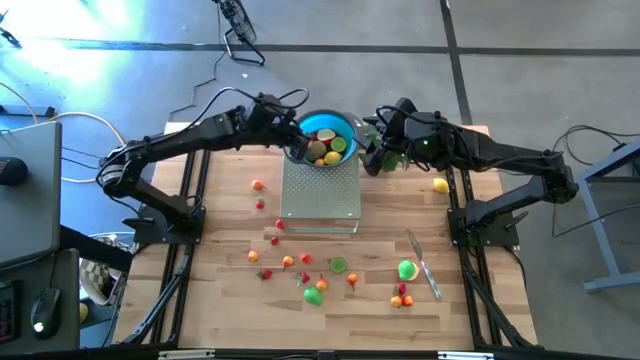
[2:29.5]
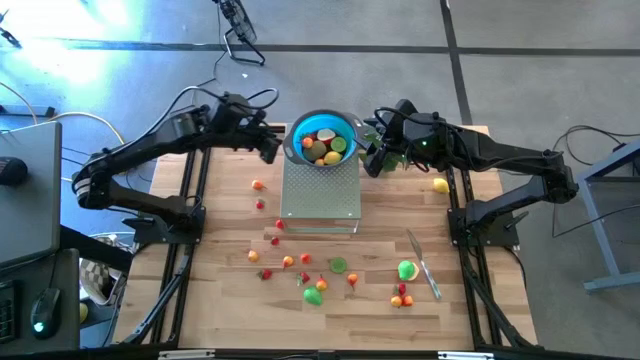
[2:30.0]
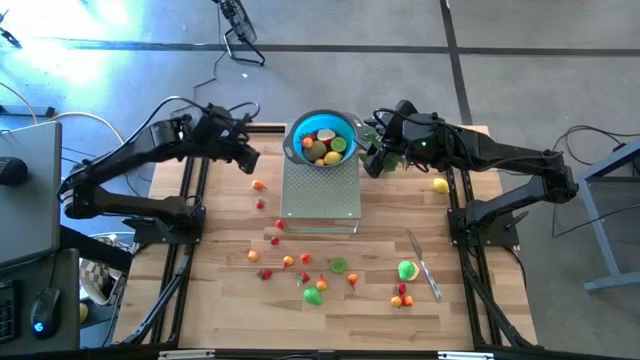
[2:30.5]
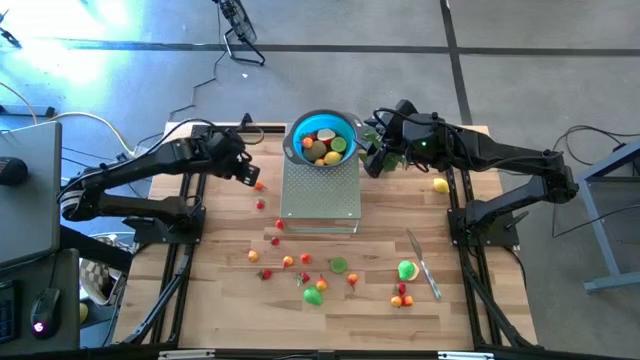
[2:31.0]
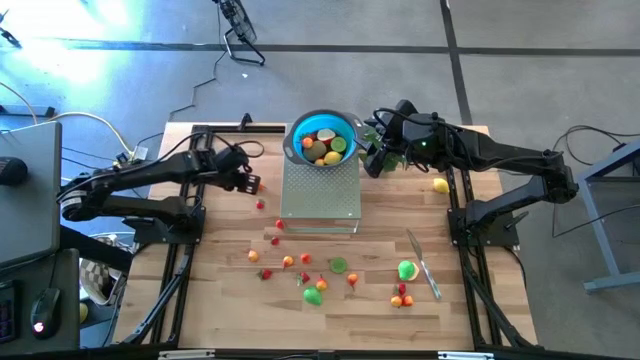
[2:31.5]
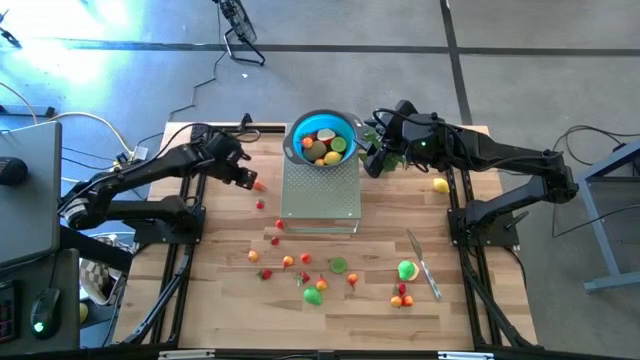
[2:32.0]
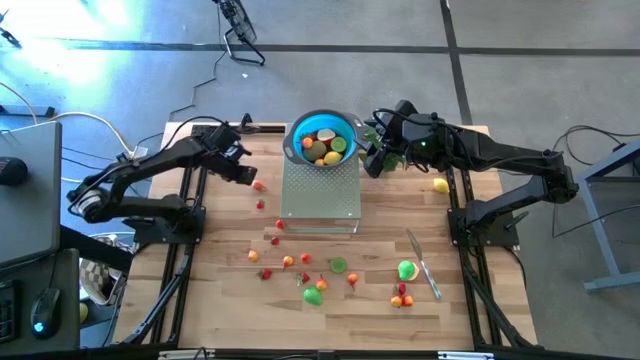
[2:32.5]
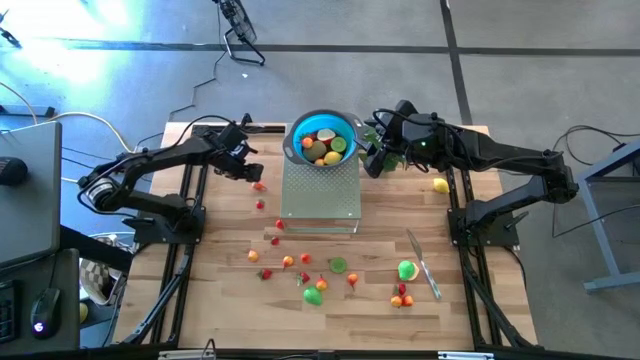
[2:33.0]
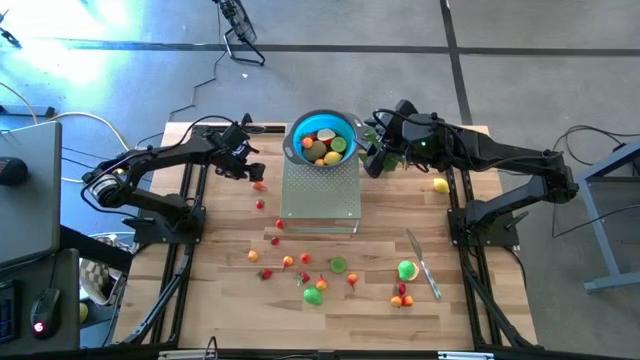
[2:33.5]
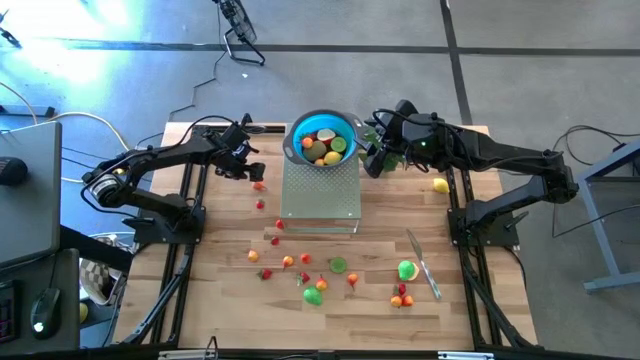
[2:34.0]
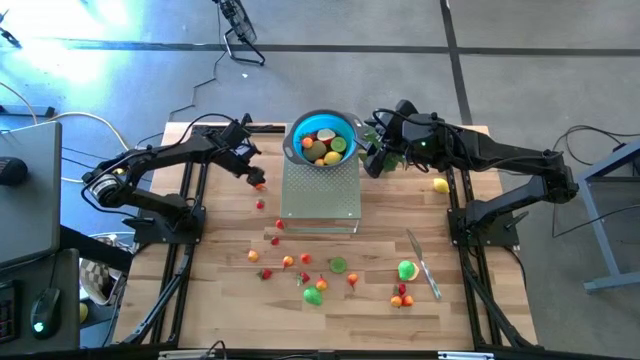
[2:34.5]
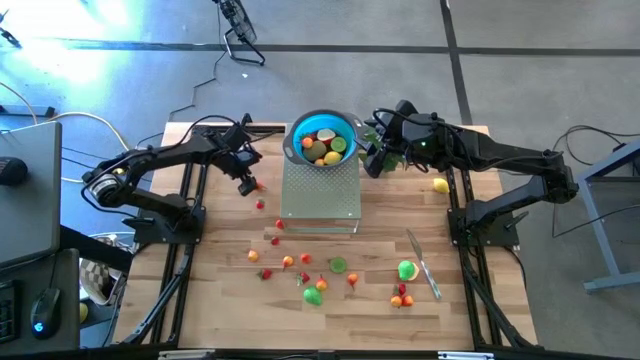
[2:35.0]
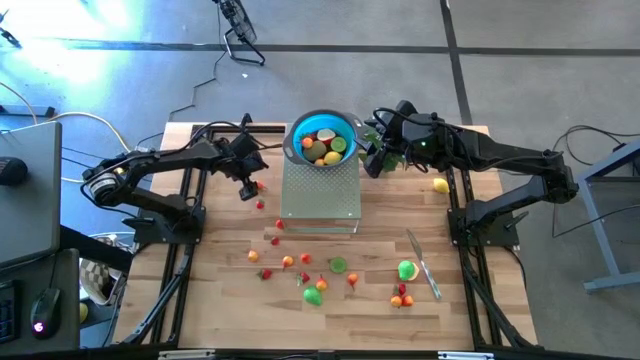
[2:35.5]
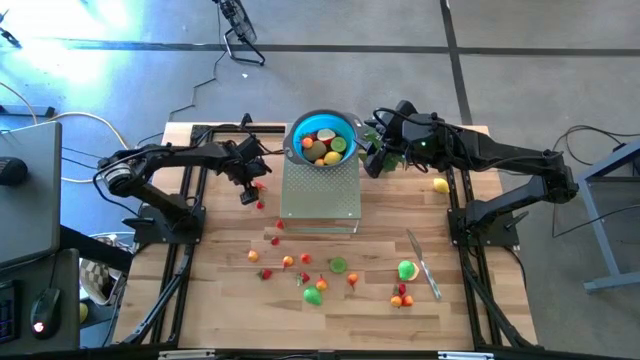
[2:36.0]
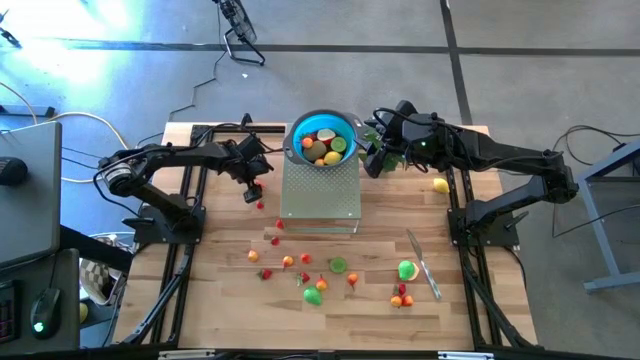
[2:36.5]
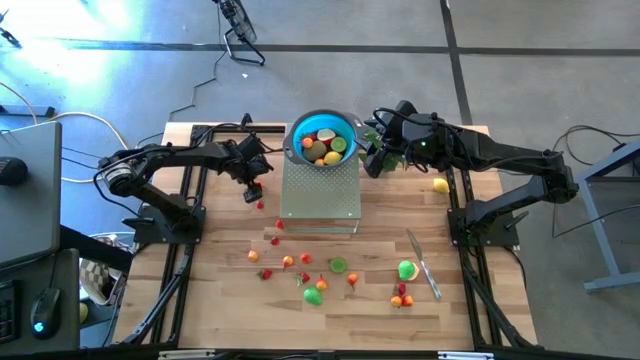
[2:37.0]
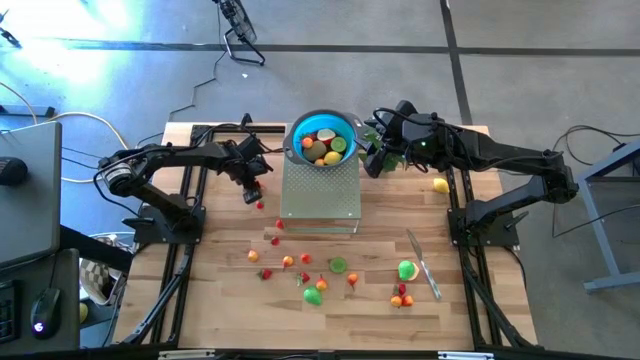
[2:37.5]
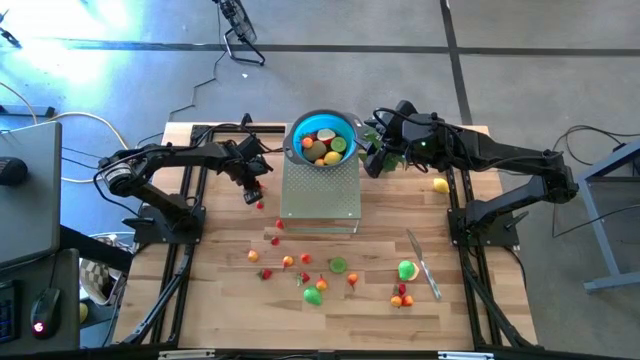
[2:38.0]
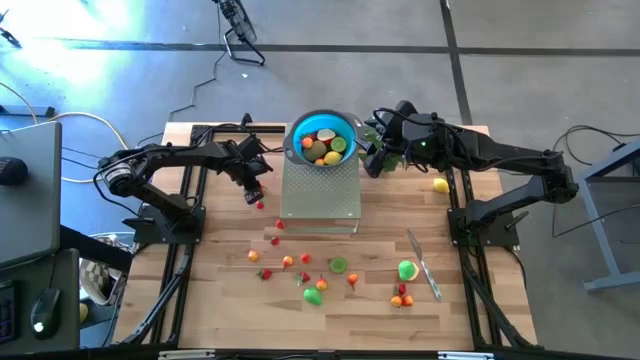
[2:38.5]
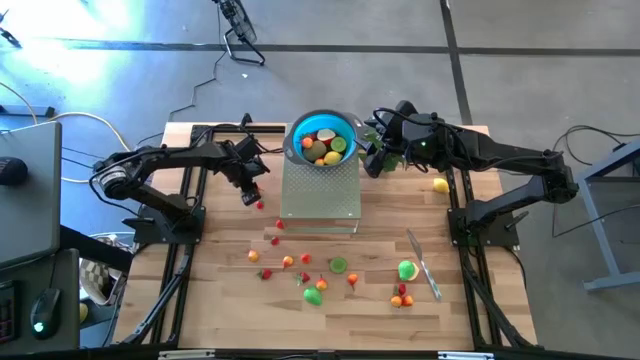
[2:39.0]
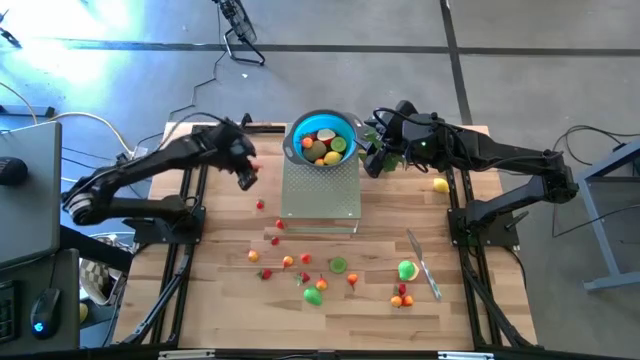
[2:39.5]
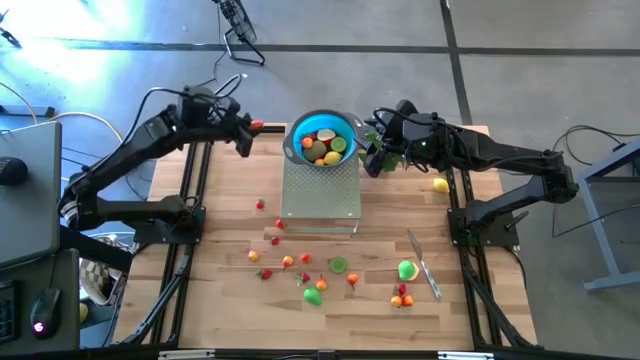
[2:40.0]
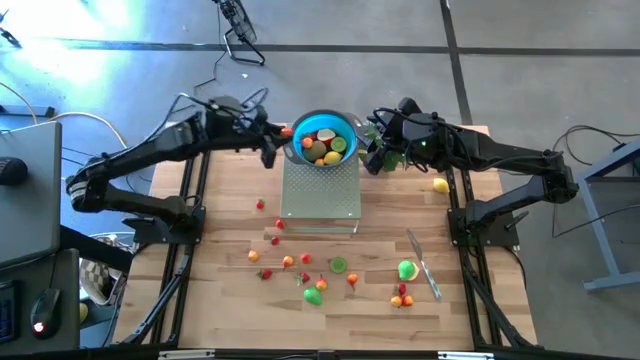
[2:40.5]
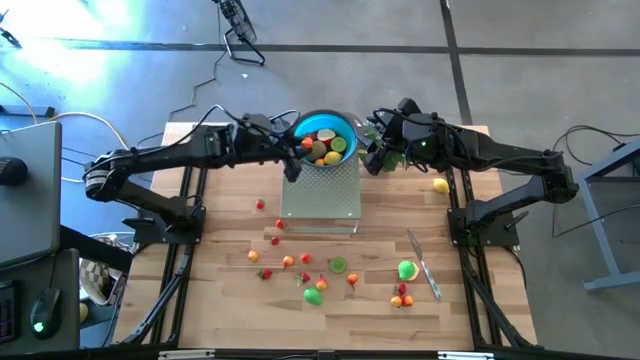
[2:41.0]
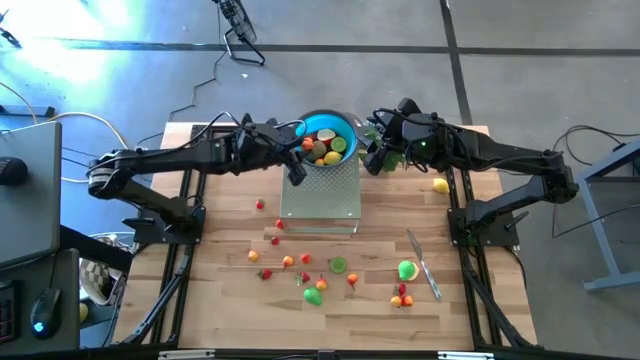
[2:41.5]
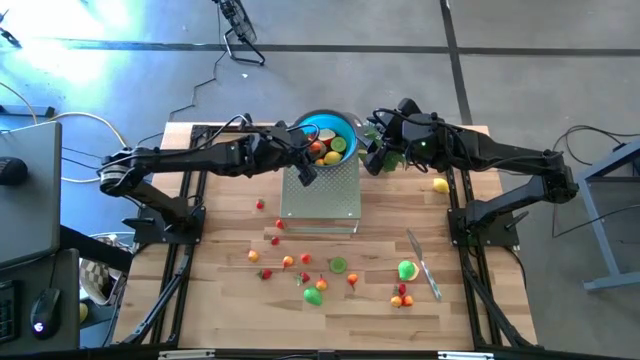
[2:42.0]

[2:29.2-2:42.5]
Task: Pick & Place Fruit
Put the orange peach in the blue bowl on the shelf

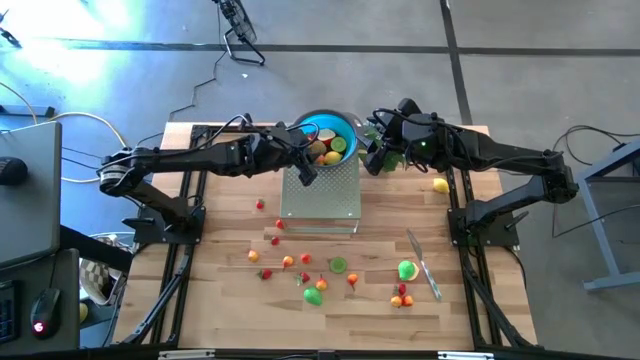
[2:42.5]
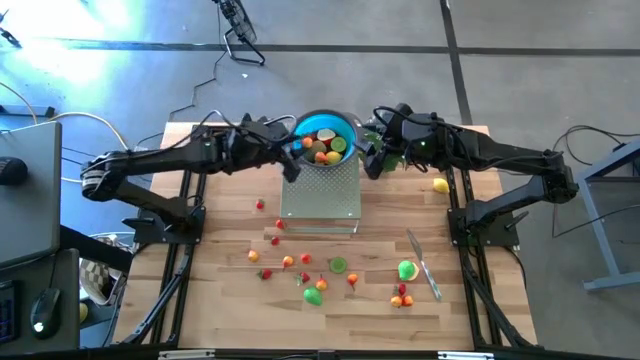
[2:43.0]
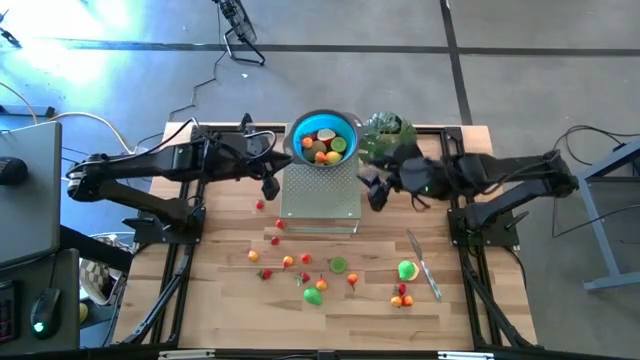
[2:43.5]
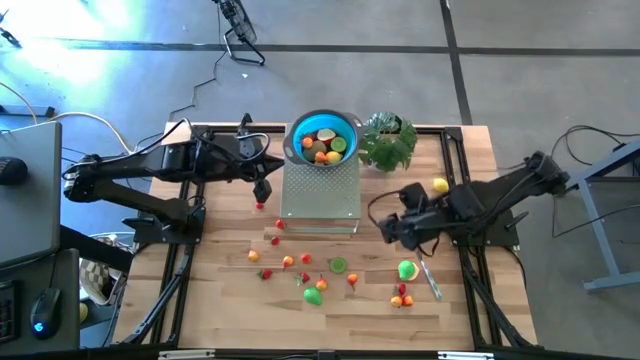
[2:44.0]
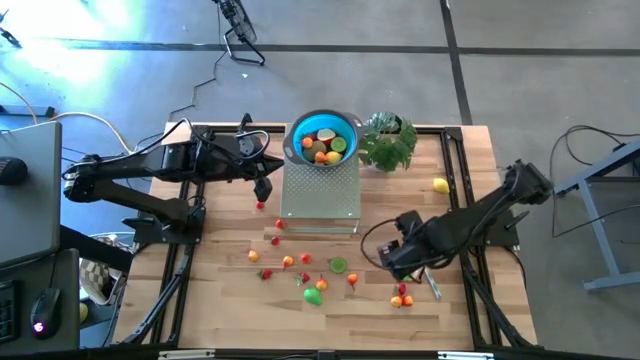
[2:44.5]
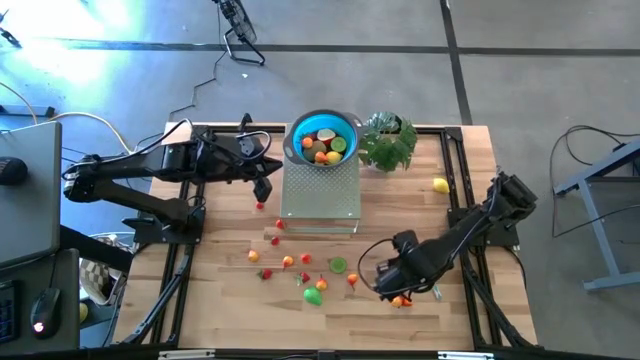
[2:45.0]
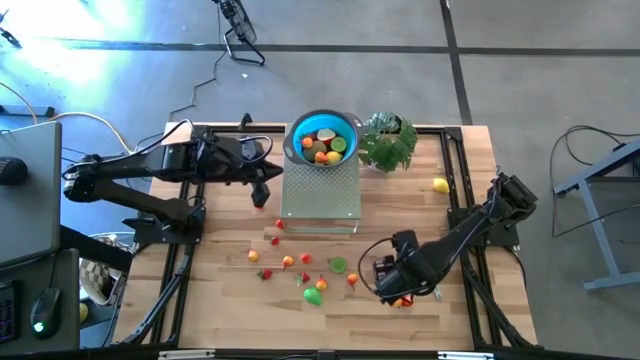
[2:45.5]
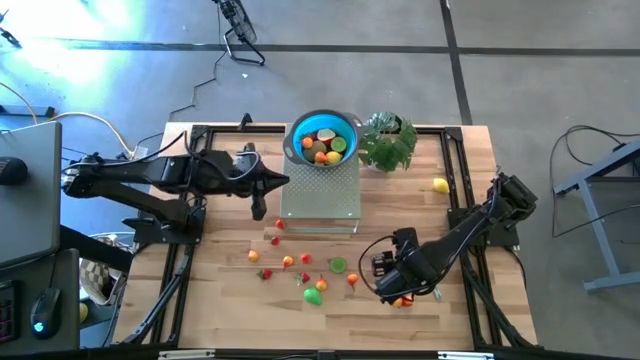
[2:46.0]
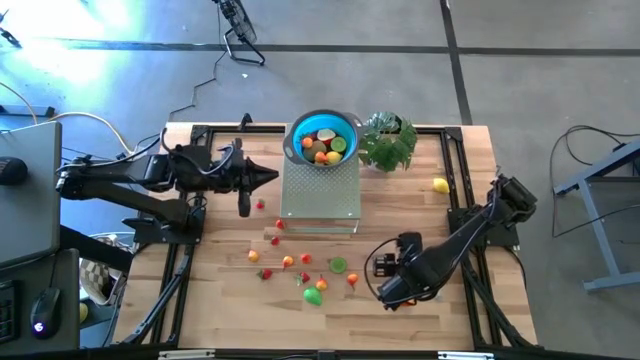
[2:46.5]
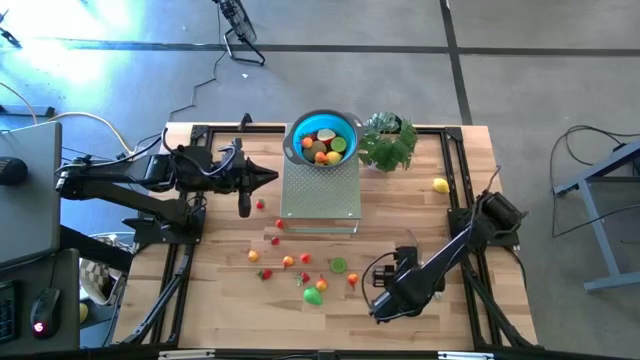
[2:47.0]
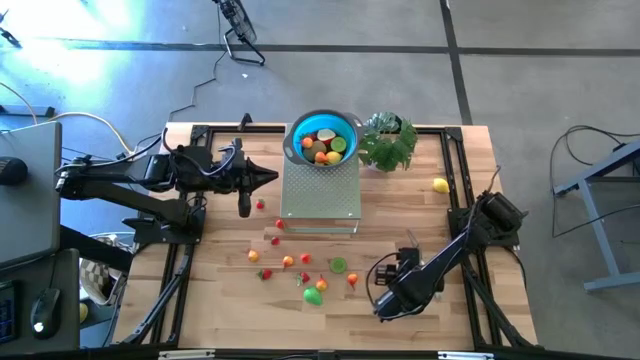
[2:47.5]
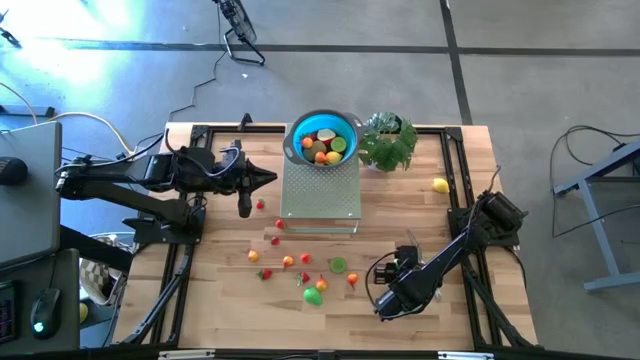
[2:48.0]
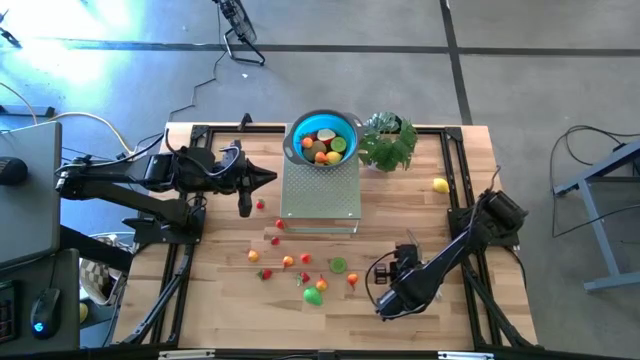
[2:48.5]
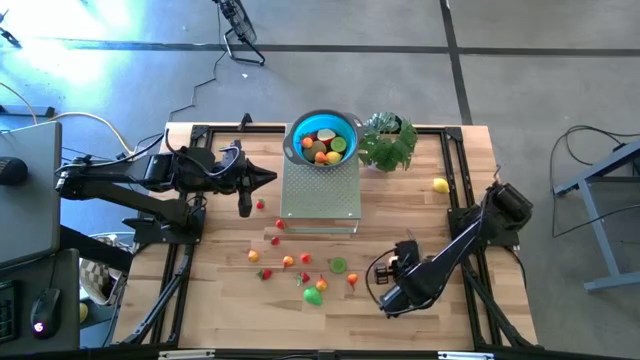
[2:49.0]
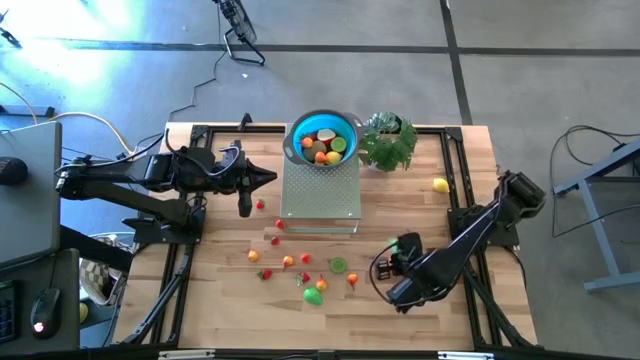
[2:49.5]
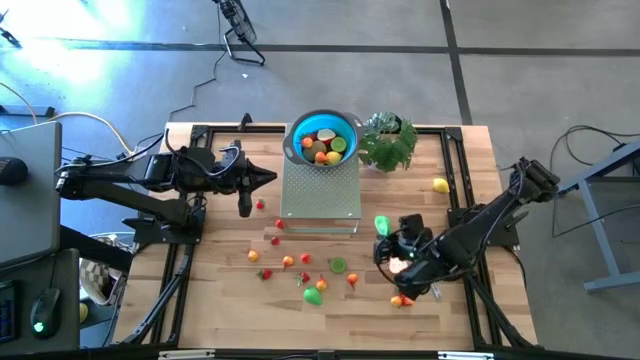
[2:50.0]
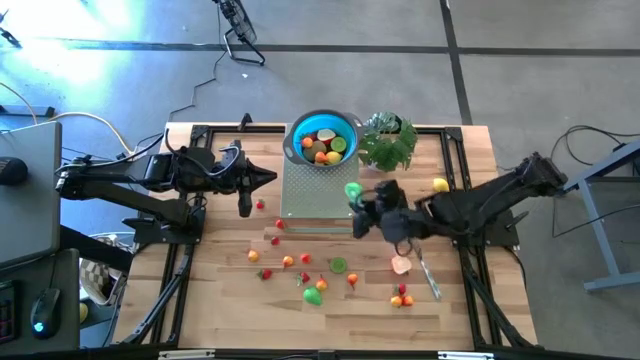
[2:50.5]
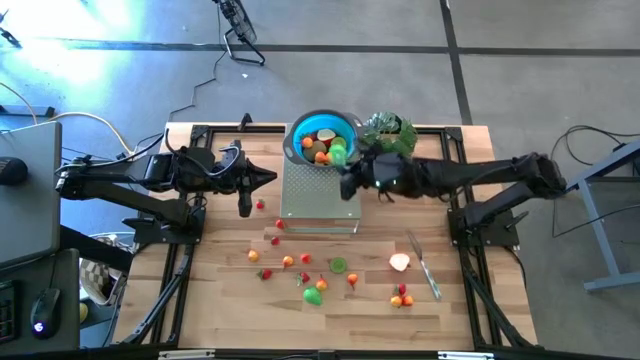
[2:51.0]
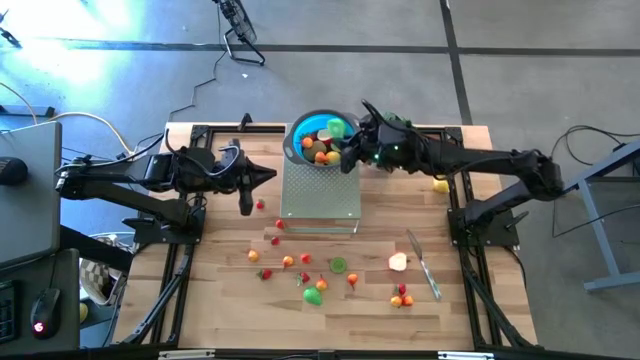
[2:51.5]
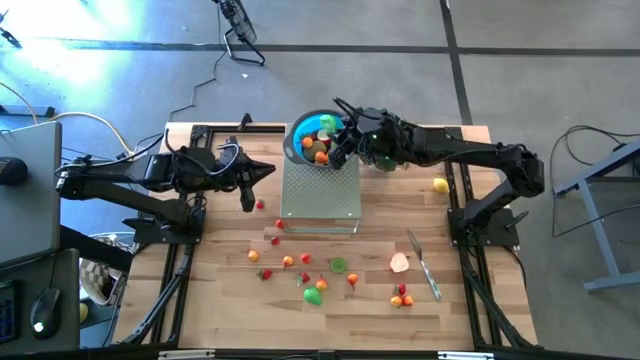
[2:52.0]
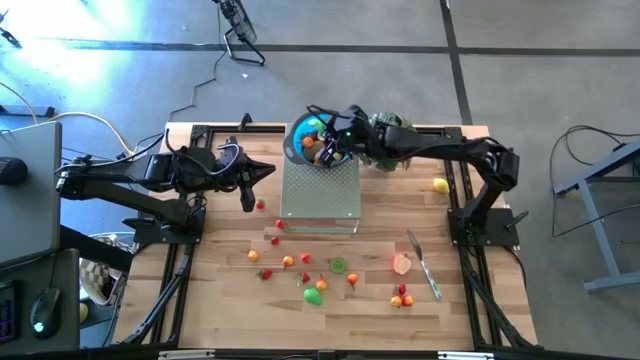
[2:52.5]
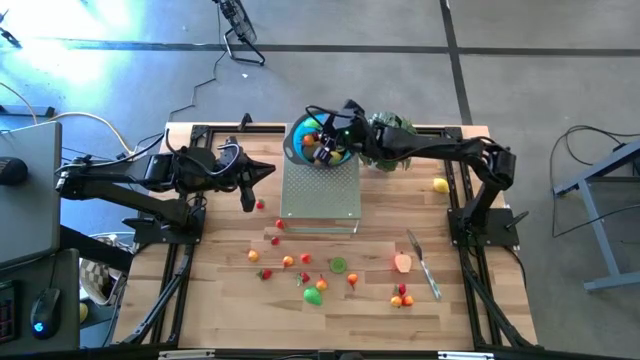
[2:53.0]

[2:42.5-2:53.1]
Put the green pear in the blue bowl on the shelf
